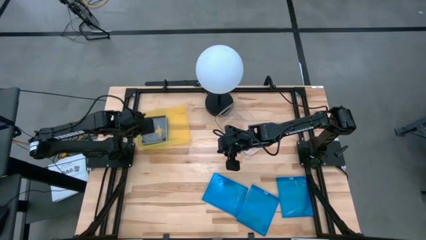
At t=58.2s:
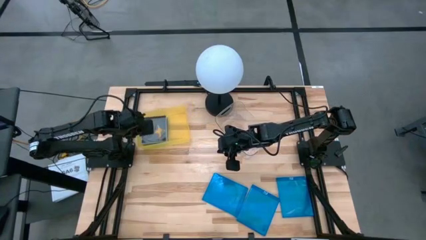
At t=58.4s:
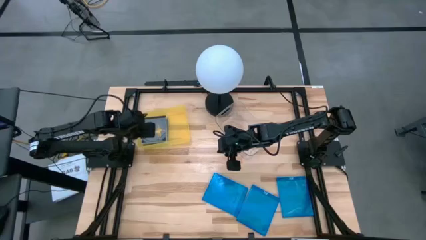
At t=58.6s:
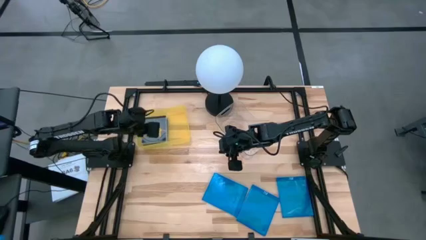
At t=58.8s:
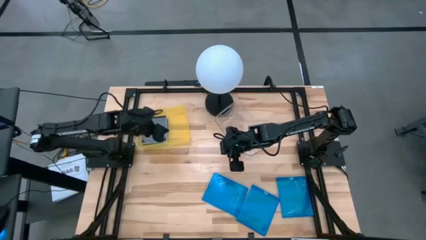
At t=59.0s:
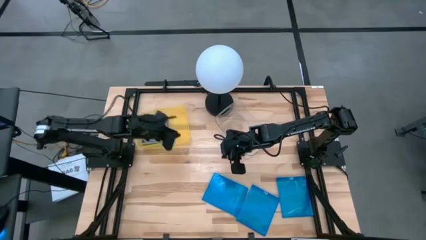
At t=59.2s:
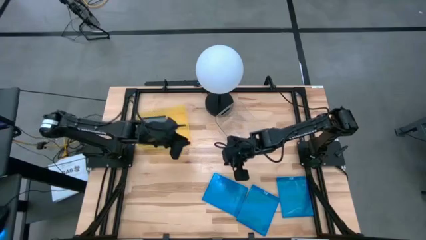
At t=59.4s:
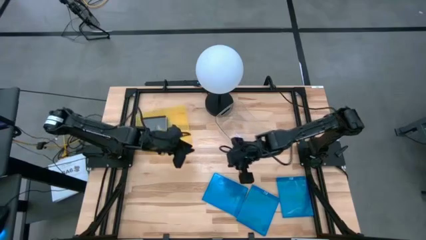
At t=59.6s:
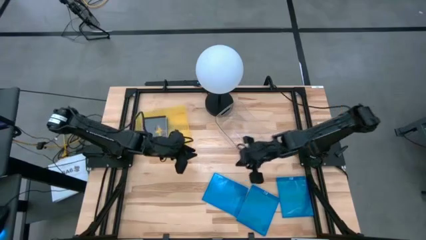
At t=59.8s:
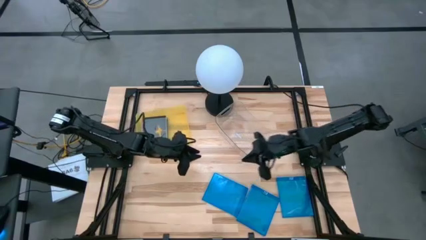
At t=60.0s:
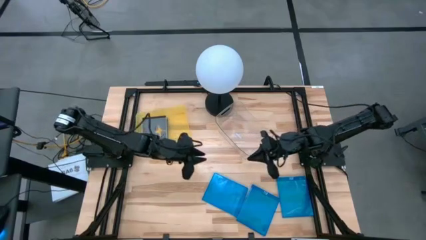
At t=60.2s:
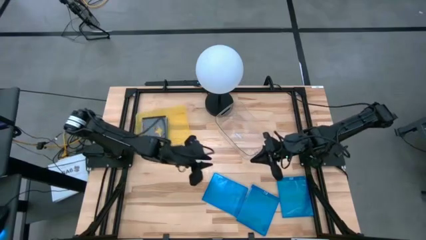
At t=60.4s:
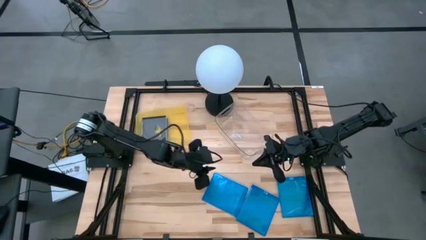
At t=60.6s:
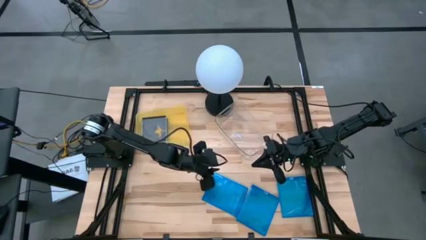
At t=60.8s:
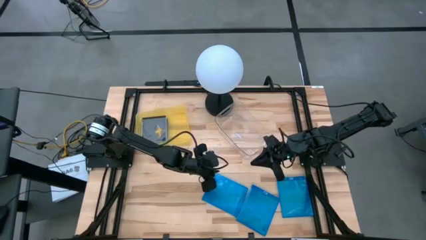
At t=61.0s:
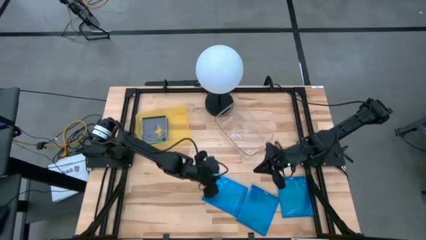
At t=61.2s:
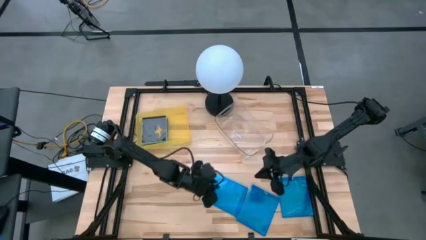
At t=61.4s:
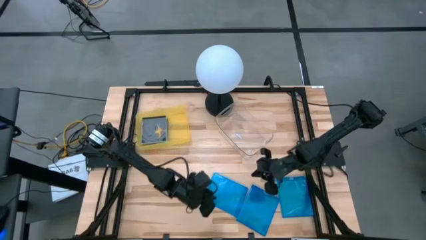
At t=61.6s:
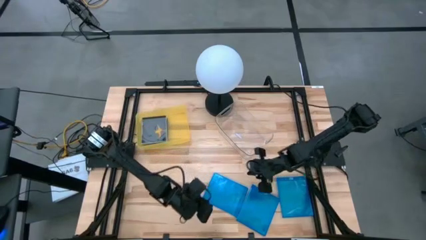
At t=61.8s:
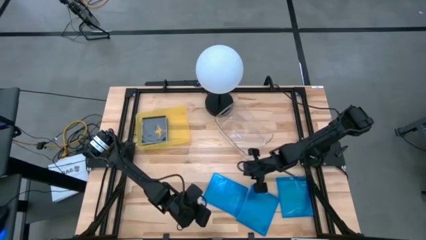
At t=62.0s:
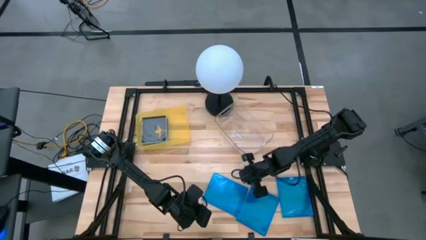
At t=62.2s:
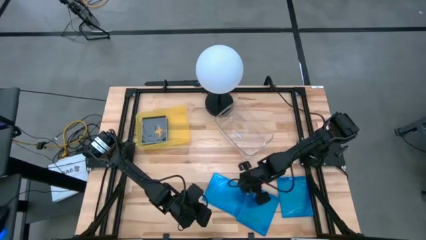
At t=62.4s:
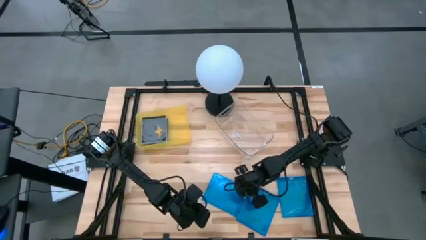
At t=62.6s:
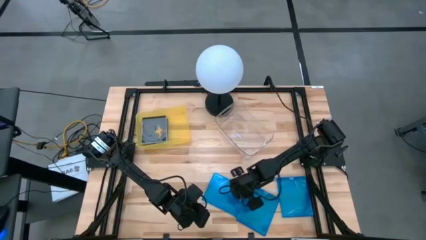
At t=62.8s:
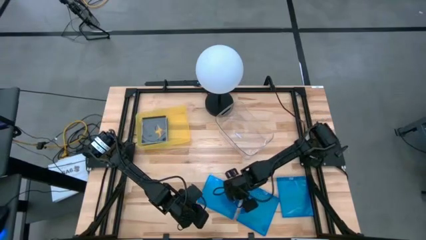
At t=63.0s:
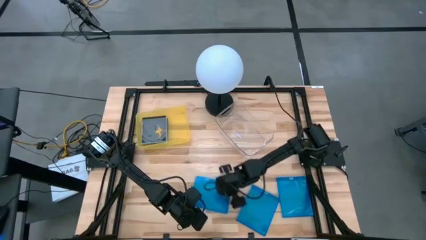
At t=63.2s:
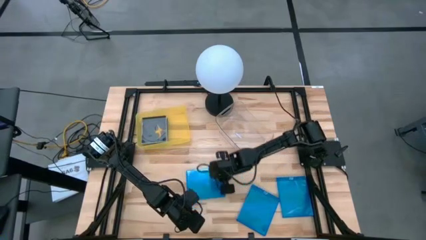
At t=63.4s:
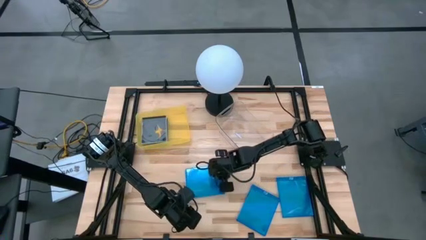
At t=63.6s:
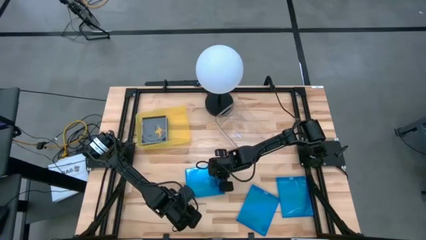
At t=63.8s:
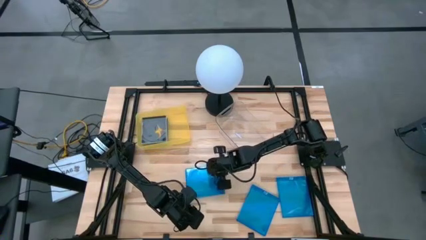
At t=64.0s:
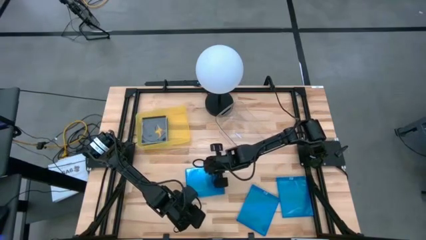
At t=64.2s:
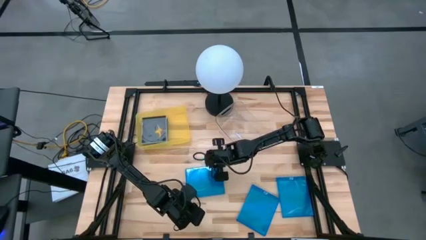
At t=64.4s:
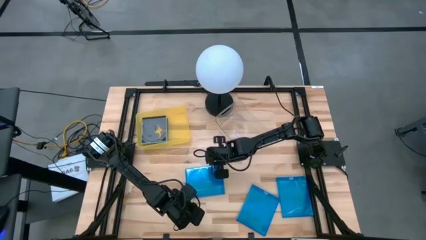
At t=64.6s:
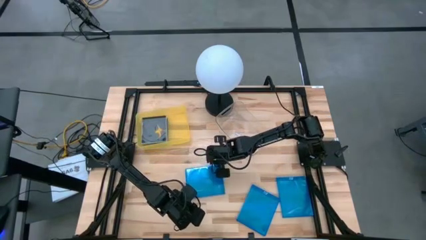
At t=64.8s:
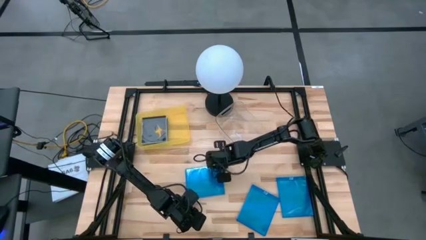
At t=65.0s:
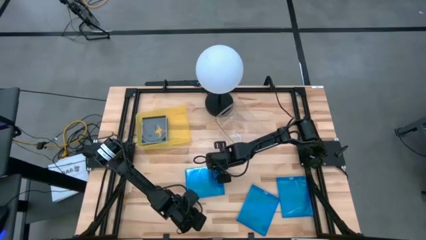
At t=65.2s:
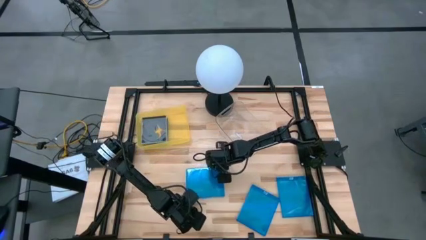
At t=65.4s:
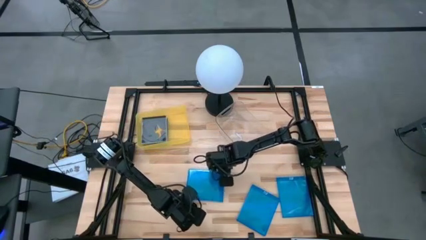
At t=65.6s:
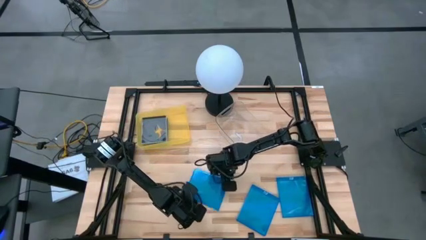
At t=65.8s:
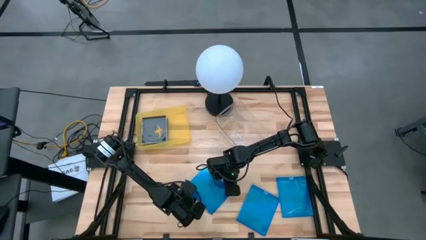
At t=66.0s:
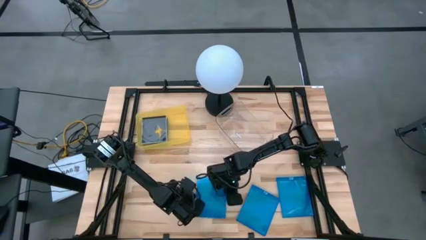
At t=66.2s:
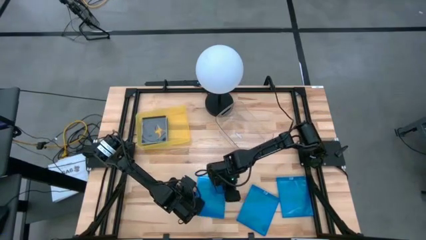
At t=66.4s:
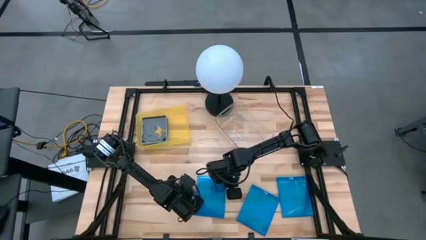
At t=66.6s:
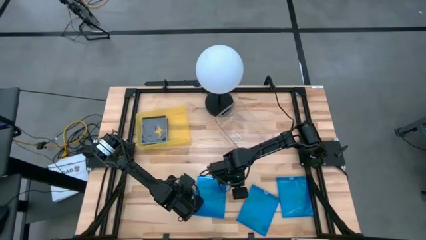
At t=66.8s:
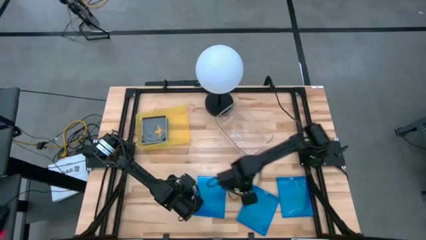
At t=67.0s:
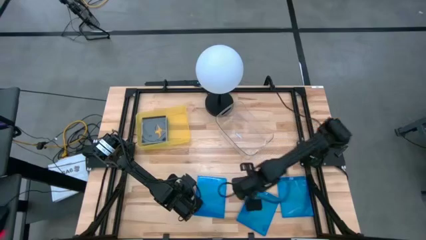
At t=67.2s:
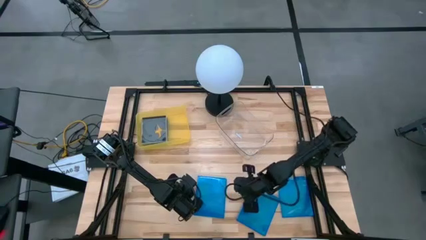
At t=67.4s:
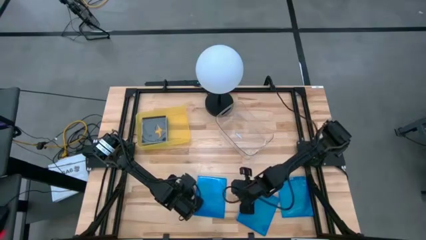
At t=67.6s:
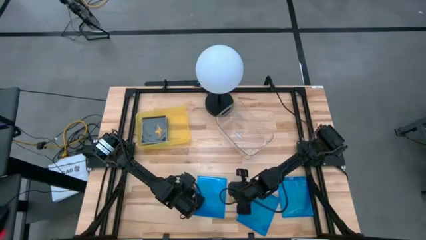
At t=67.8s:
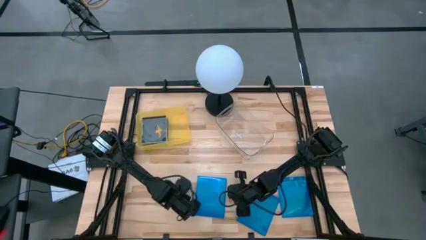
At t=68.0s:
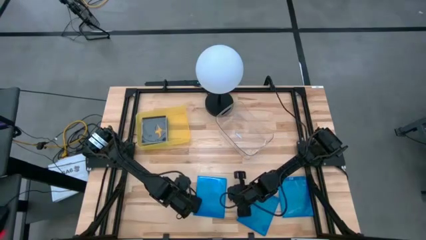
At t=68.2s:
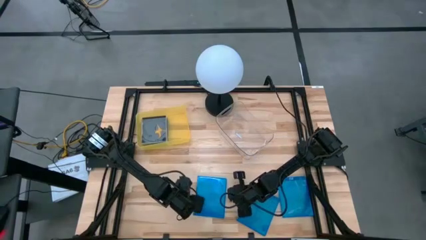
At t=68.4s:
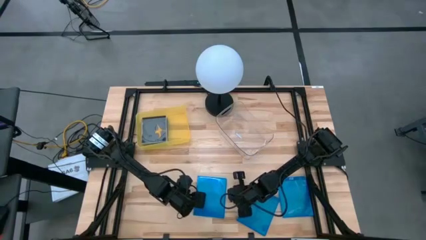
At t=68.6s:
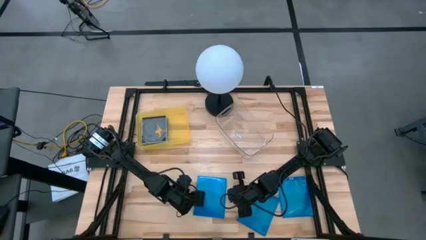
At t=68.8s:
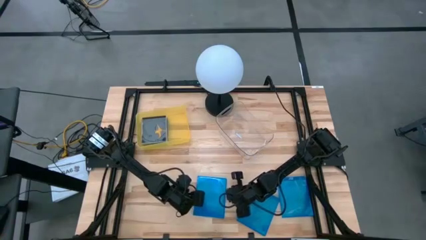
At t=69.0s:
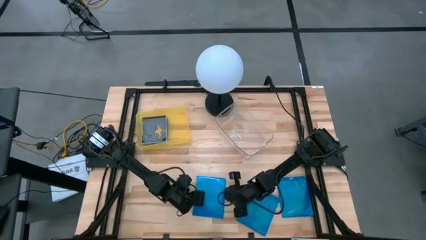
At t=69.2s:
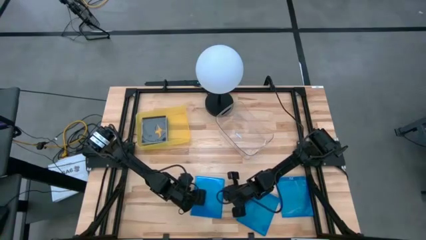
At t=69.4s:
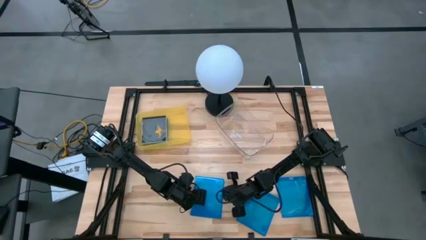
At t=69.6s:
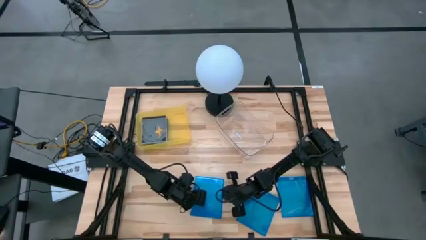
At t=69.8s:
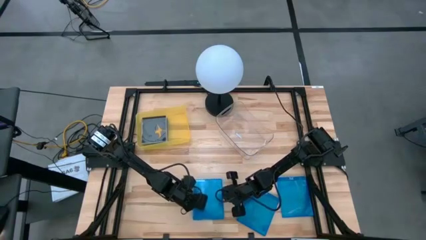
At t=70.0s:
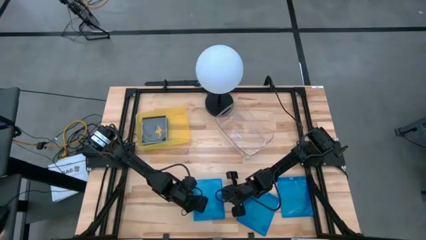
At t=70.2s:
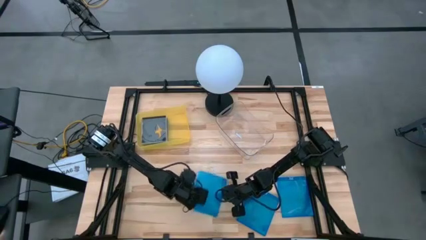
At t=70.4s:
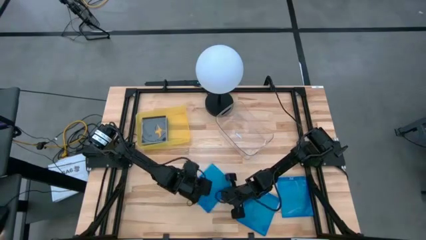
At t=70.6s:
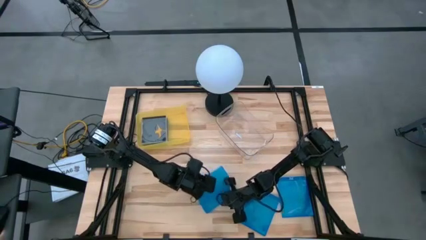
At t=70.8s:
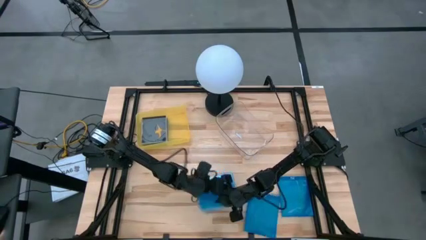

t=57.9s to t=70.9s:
Task: Pick & place jewel cases by type
Put the left blue CD case into the transparent bin

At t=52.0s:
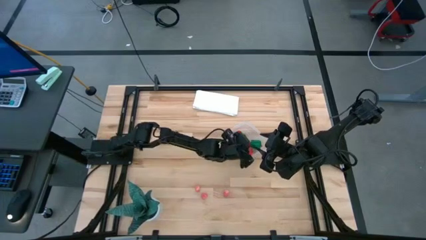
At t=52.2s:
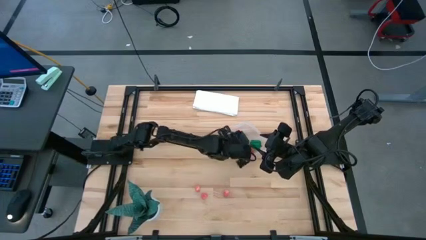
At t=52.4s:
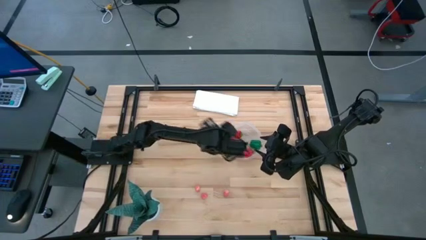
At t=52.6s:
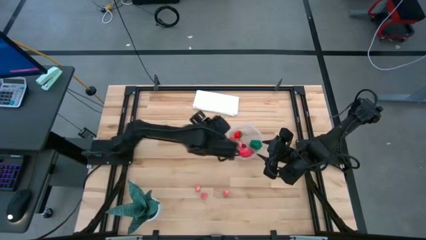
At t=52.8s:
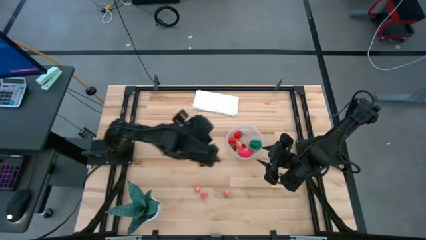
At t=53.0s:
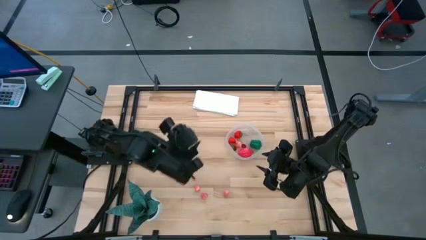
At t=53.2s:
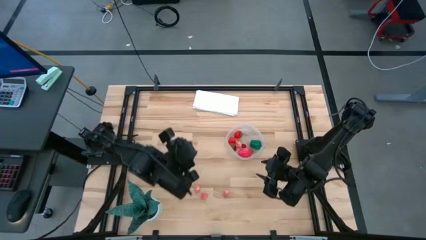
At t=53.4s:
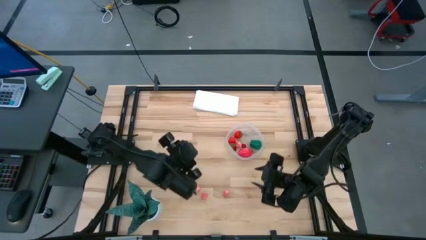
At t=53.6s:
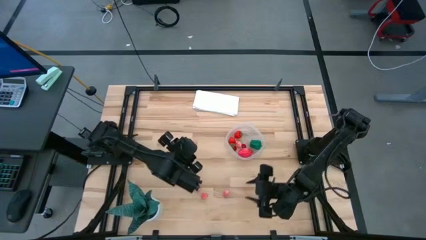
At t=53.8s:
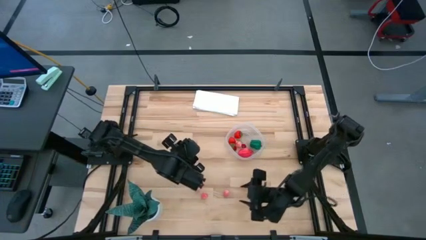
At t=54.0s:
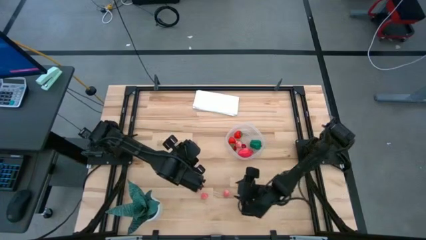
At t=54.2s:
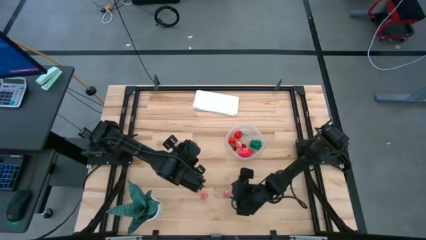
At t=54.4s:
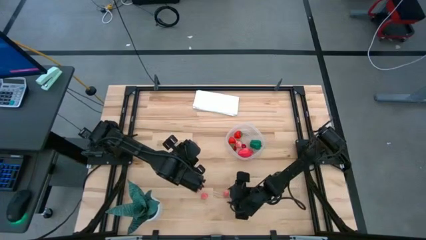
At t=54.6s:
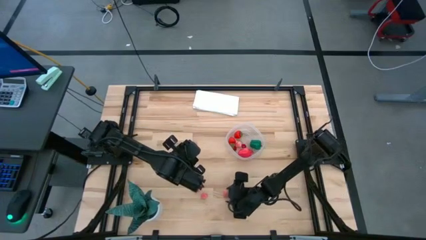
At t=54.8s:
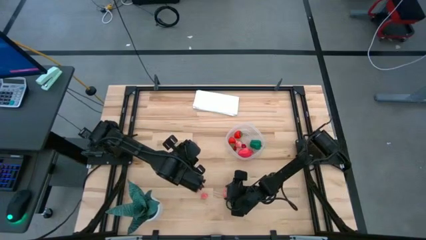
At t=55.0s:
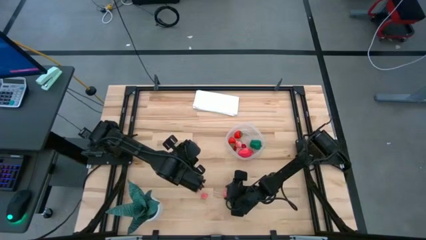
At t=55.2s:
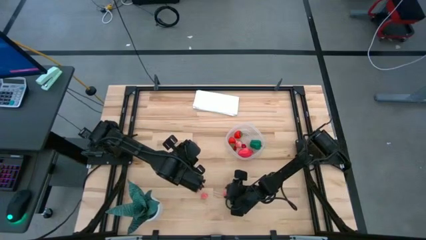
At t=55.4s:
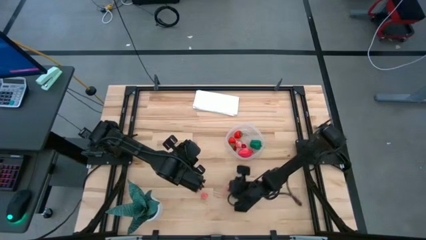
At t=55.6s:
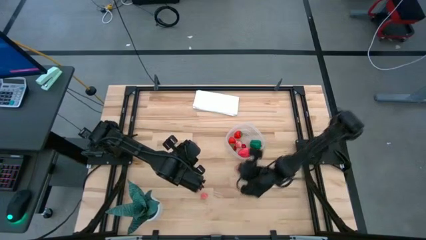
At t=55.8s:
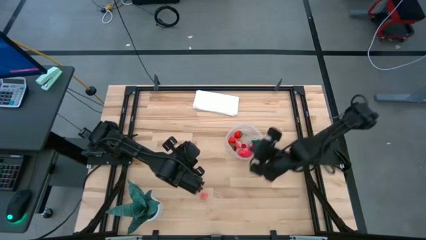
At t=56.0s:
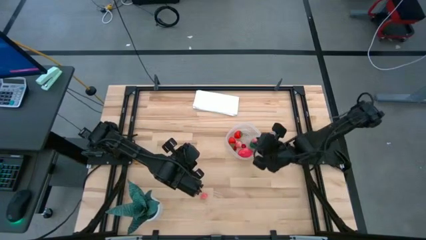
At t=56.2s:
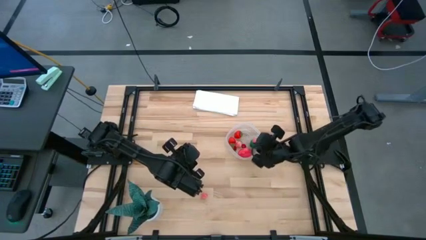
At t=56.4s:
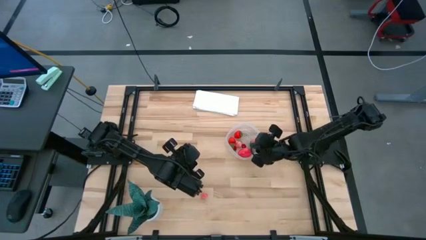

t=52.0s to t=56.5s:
Task: Pick and placing Produce into tupperware
Put the bottom right pink peach into the transparent bin
